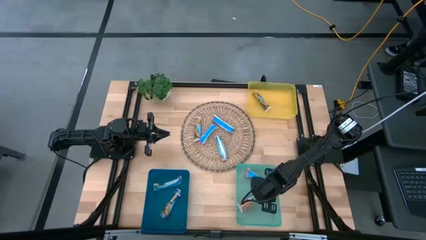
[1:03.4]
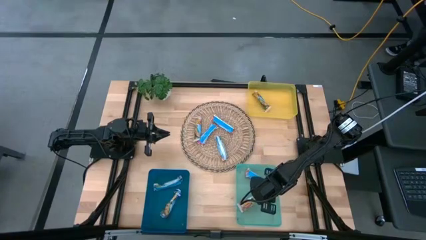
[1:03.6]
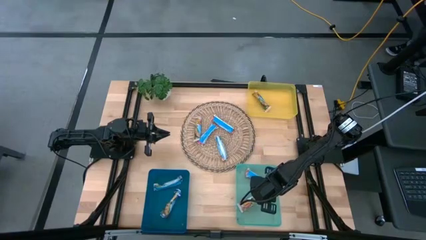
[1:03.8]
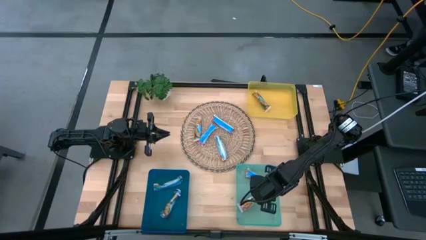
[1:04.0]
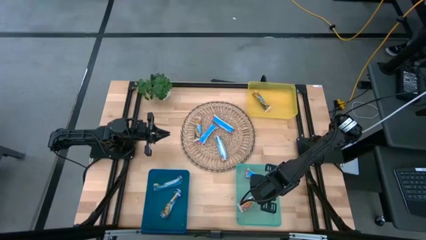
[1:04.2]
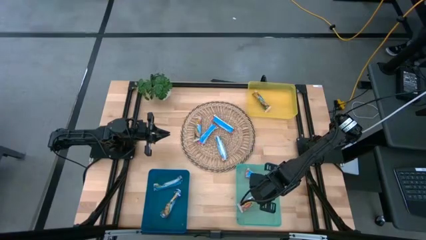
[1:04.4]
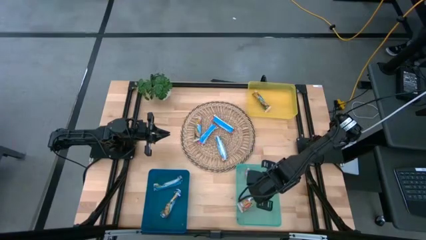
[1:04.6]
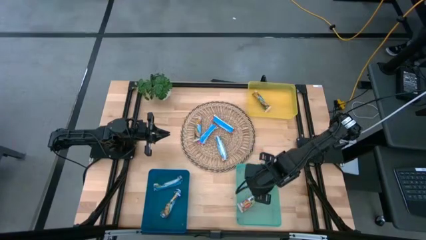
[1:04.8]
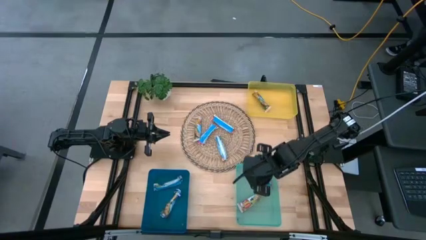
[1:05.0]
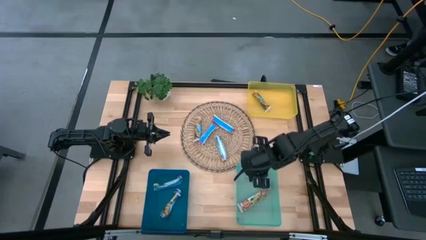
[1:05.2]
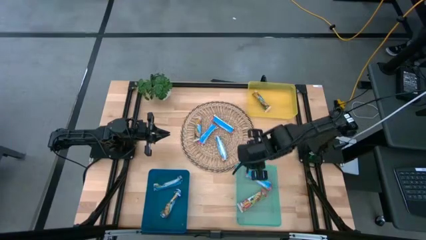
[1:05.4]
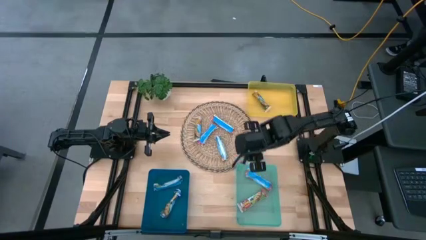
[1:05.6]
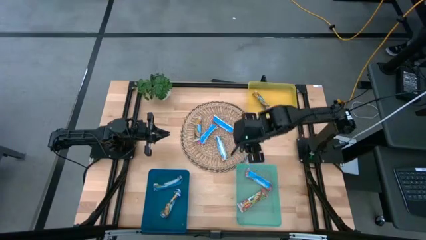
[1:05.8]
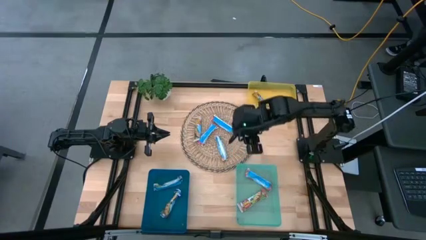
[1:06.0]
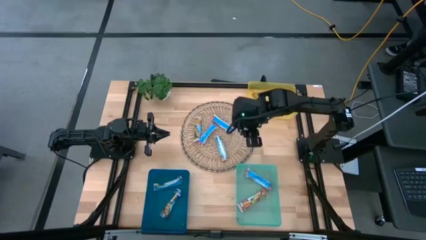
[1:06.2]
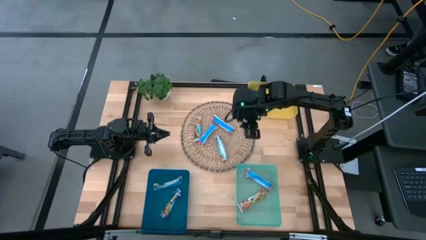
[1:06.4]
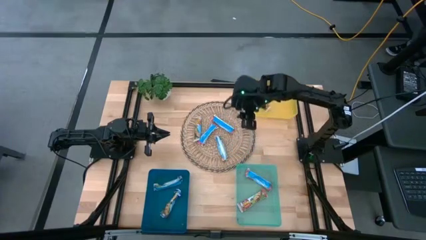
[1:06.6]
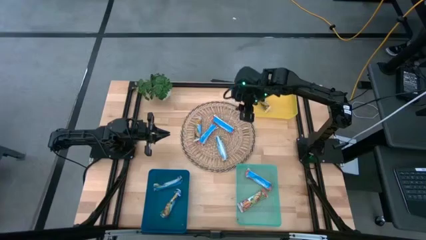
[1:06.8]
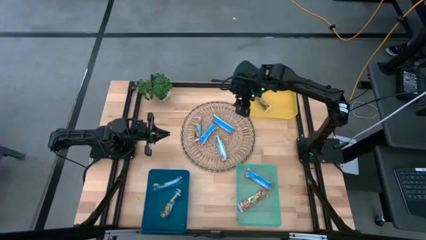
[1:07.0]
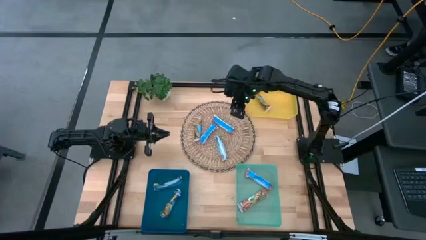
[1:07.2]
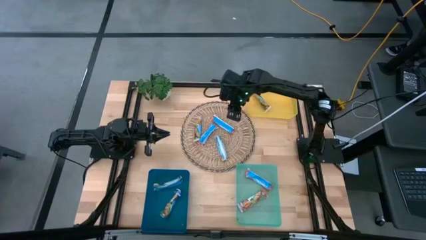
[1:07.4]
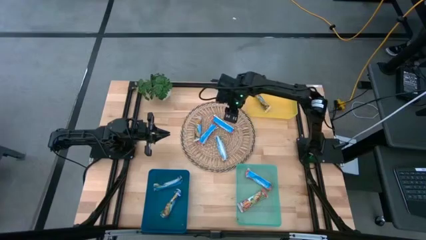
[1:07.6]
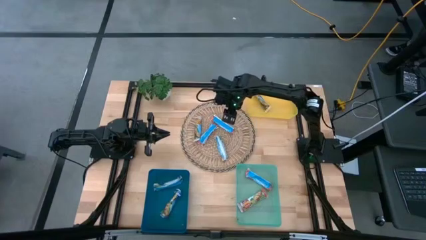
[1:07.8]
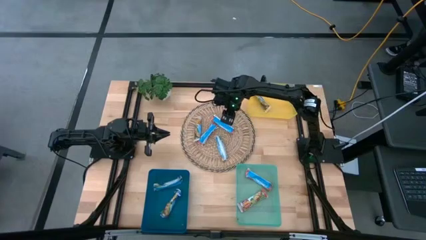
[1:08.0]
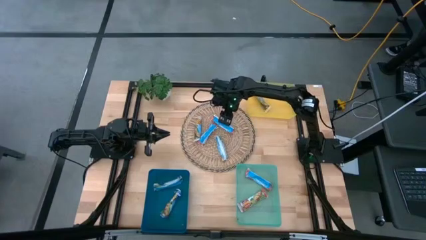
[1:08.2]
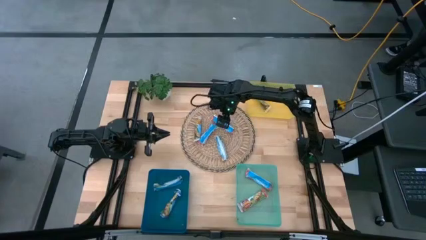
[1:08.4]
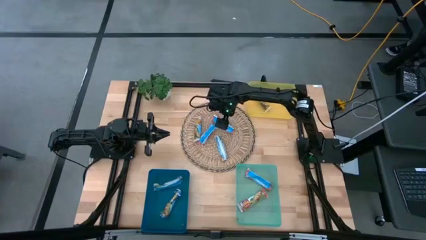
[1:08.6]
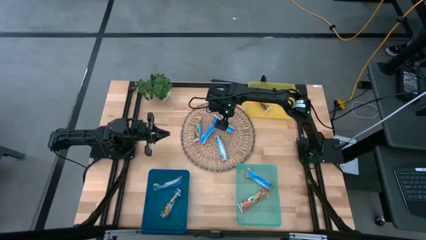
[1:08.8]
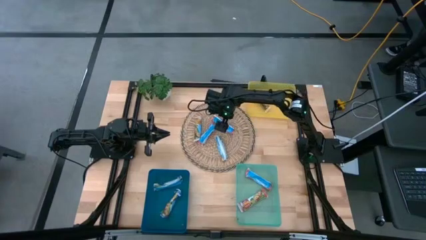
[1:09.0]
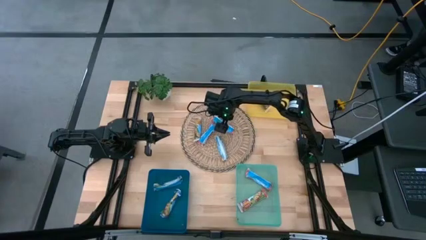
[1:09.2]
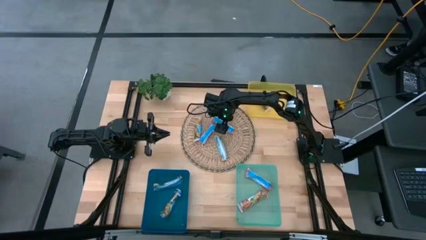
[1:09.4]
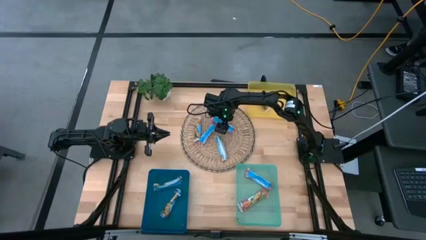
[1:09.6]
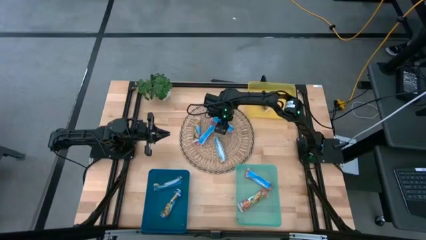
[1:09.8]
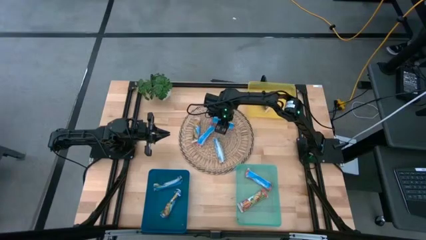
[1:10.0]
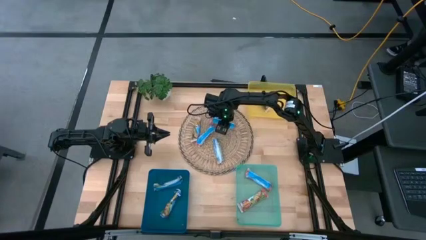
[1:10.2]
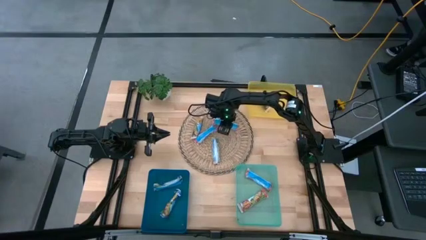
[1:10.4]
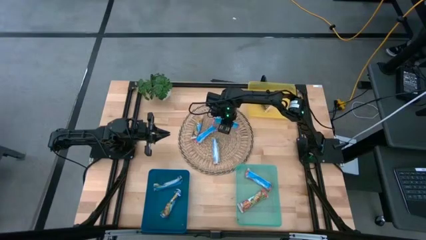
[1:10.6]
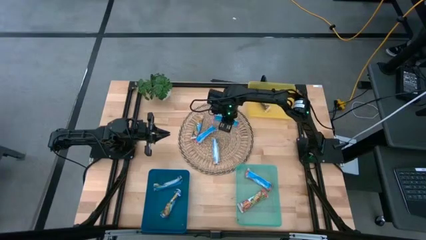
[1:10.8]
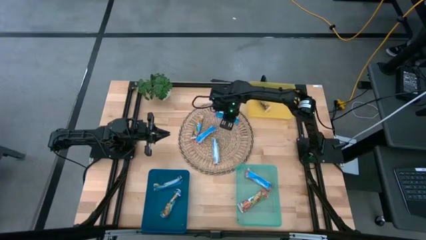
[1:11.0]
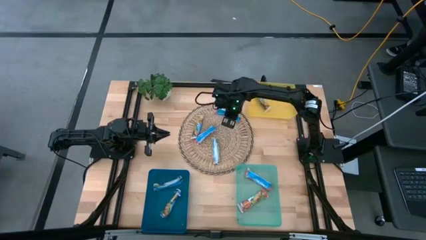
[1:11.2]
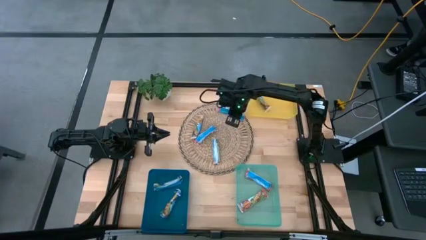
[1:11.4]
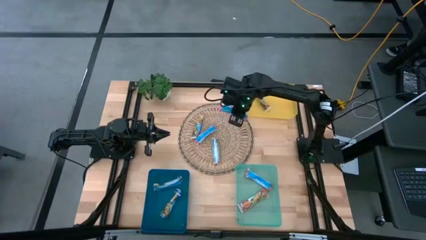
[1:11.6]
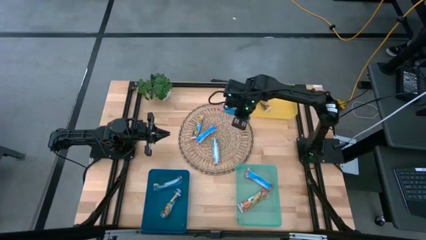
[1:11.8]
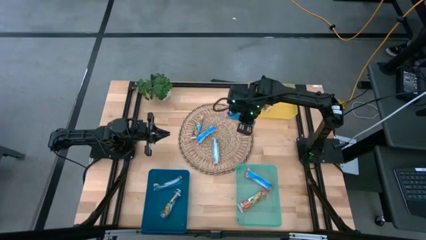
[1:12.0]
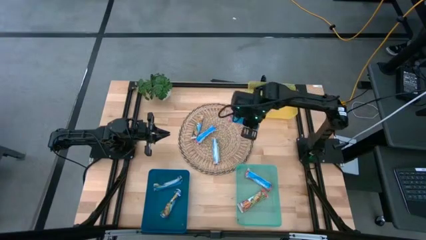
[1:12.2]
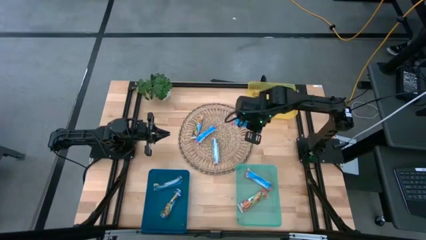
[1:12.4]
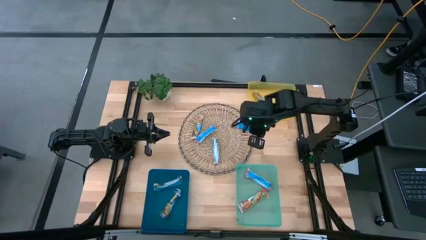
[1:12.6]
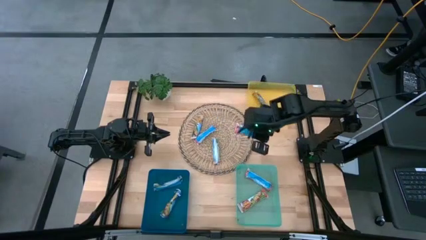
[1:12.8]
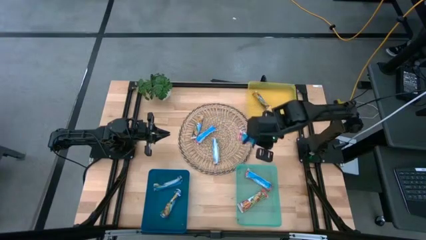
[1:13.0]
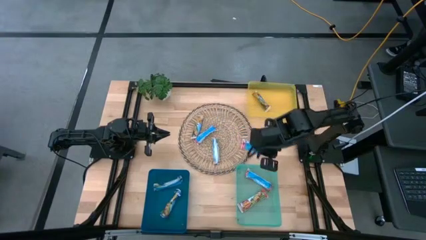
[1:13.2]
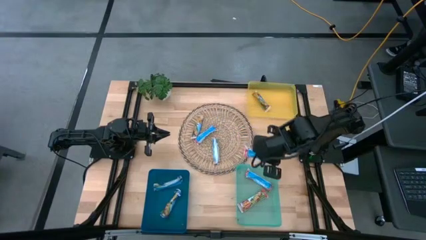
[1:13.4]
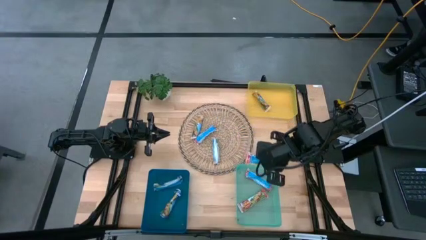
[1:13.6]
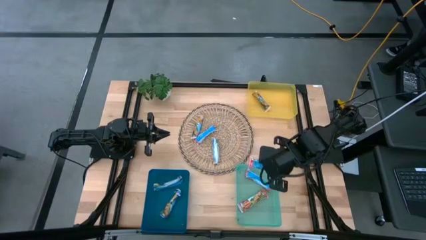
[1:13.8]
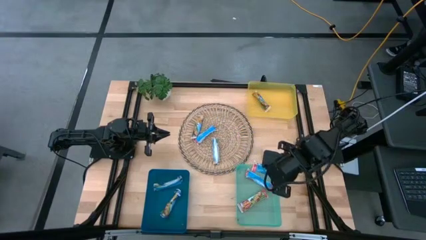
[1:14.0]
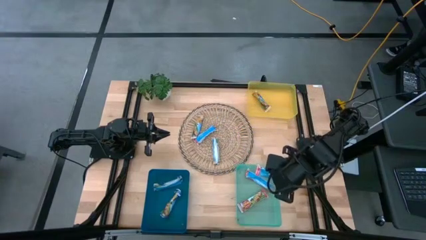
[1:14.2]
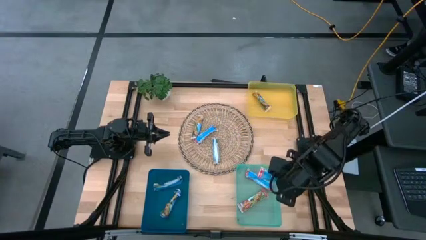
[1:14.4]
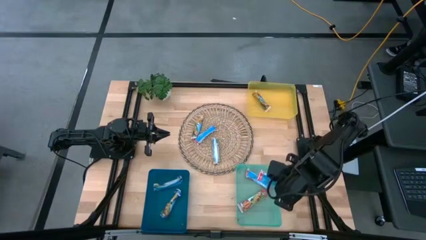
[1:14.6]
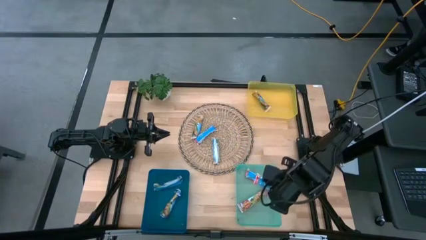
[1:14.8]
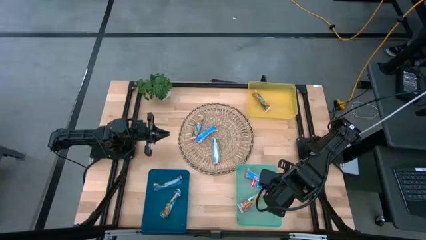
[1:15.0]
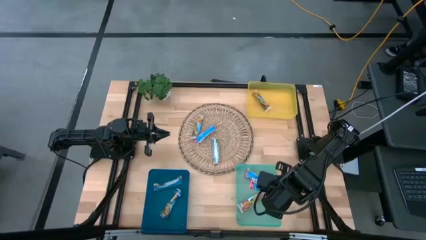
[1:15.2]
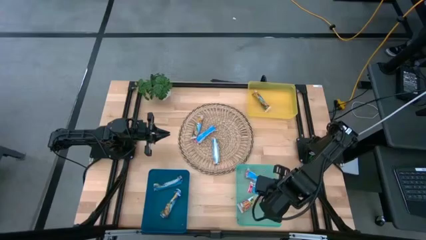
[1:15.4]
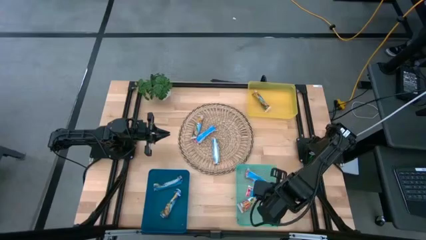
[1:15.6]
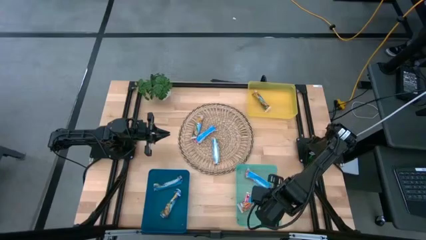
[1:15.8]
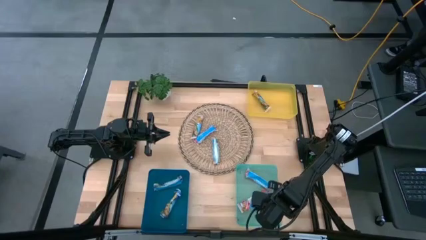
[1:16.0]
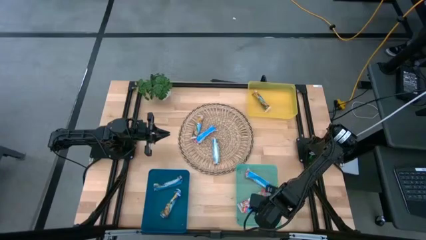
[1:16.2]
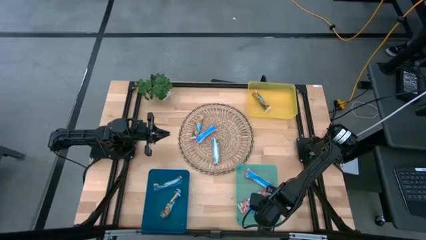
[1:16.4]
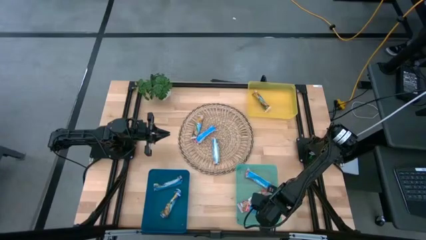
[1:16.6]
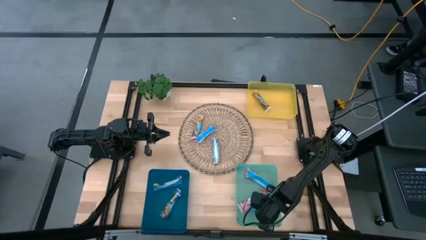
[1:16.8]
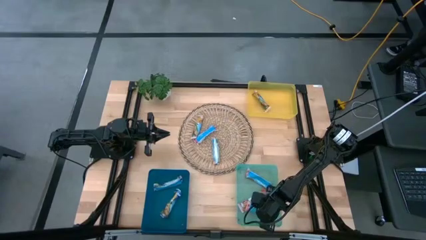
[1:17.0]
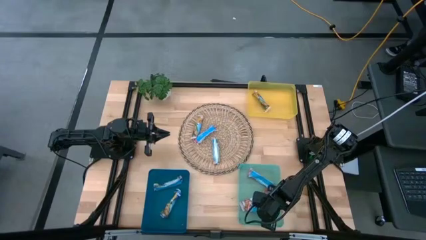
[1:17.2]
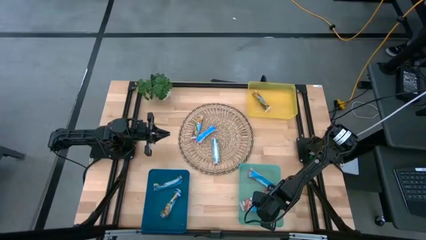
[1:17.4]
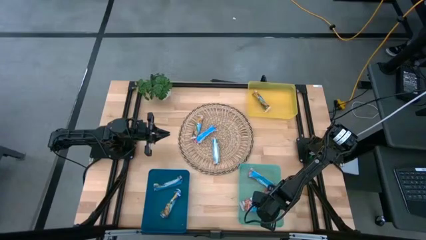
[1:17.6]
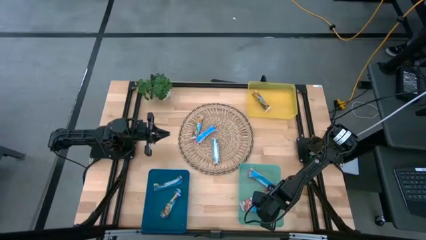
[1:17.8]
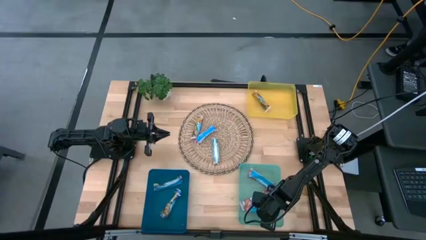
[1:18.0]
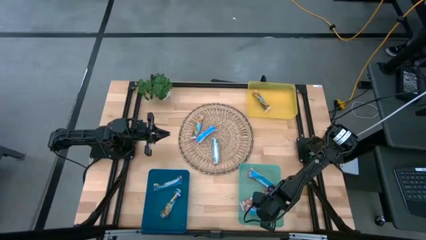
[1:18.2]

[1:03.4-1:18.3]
Task: Pick and place Granola Bars by type
Put the red granola bar into the green bin
